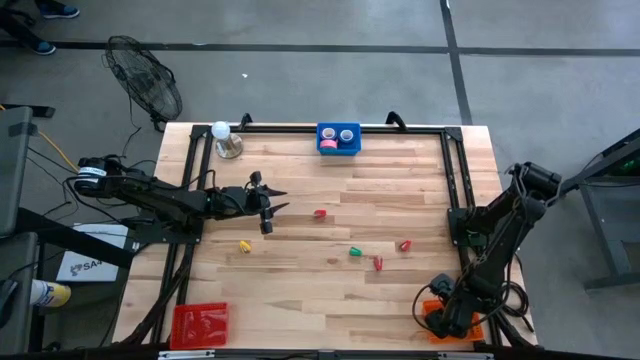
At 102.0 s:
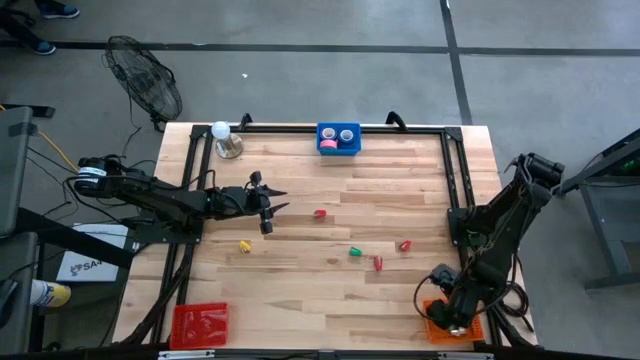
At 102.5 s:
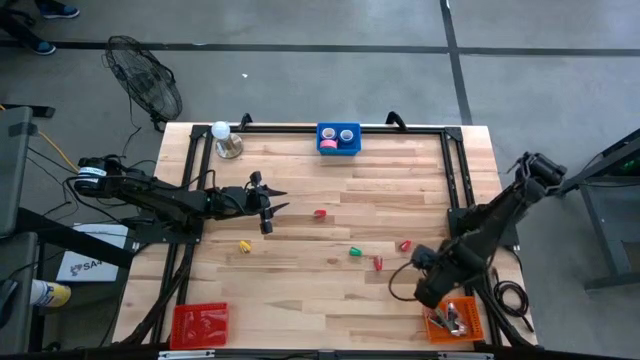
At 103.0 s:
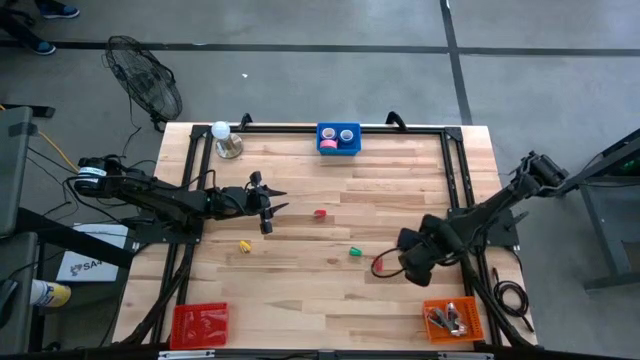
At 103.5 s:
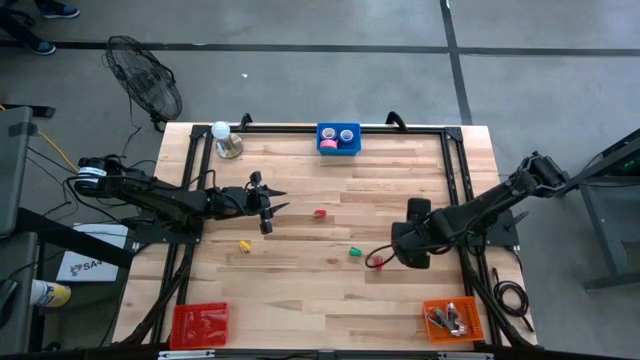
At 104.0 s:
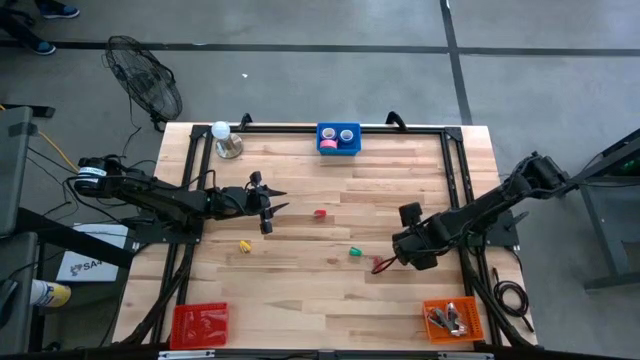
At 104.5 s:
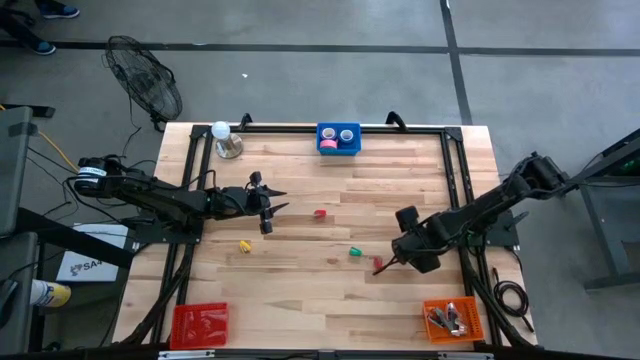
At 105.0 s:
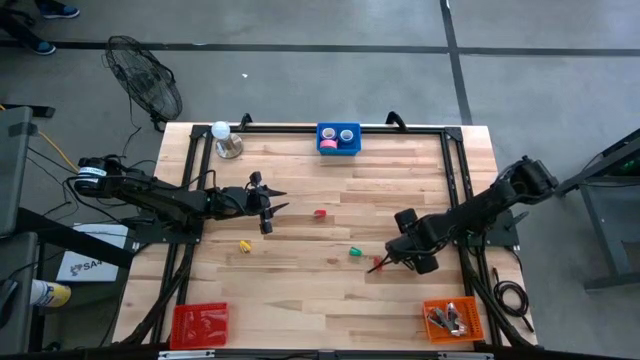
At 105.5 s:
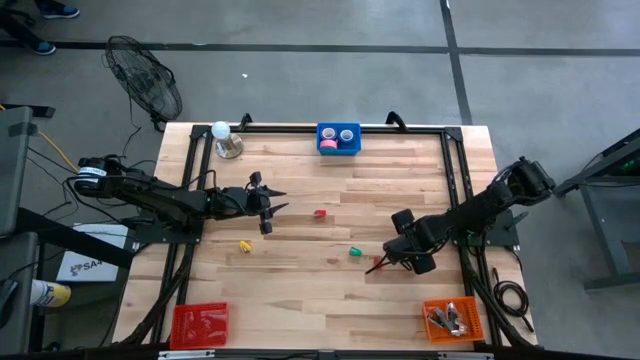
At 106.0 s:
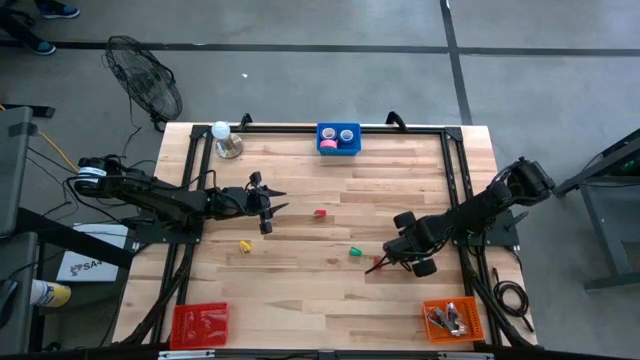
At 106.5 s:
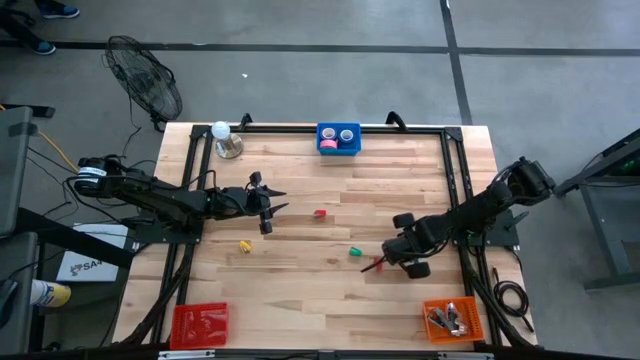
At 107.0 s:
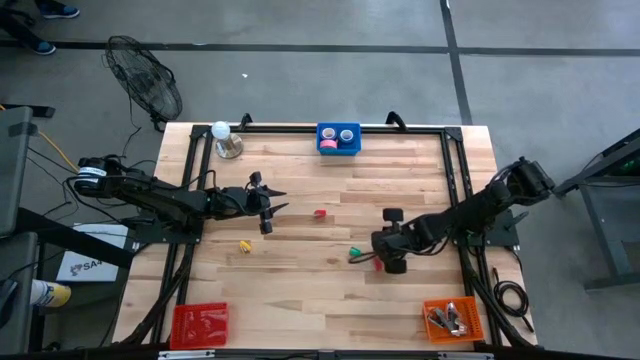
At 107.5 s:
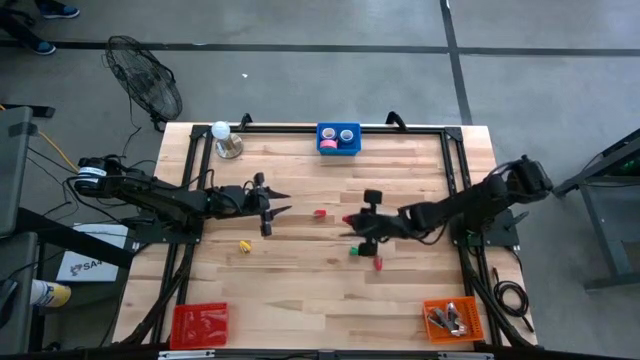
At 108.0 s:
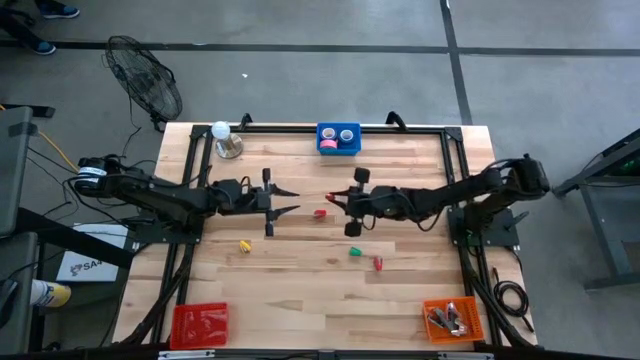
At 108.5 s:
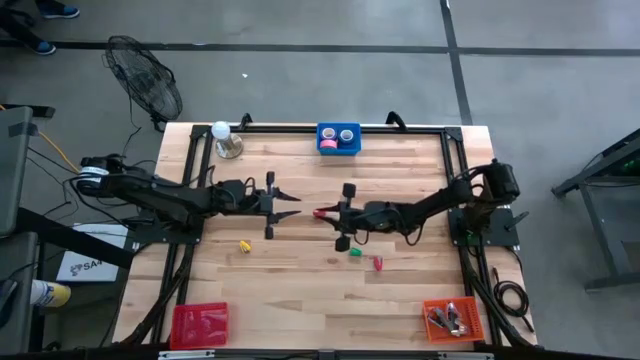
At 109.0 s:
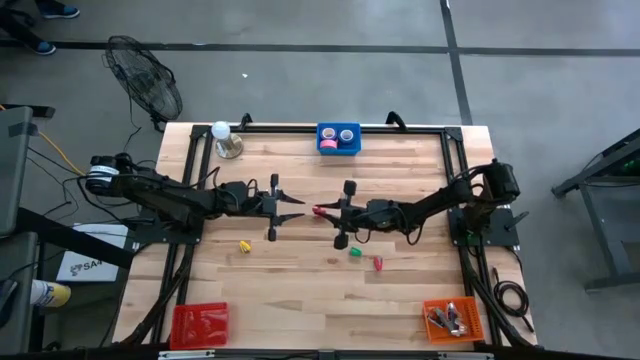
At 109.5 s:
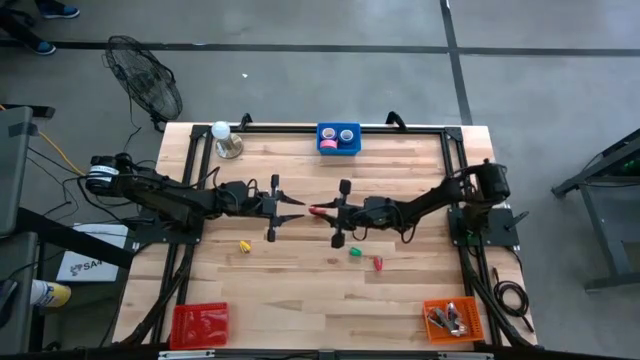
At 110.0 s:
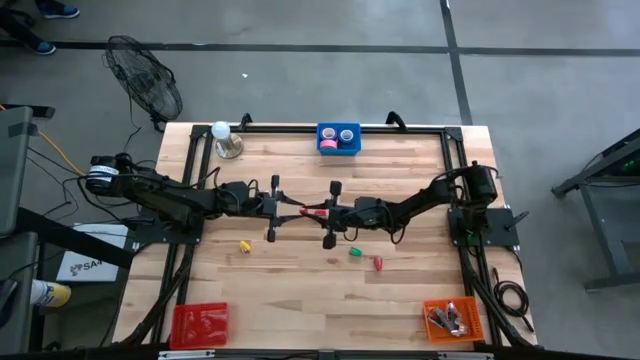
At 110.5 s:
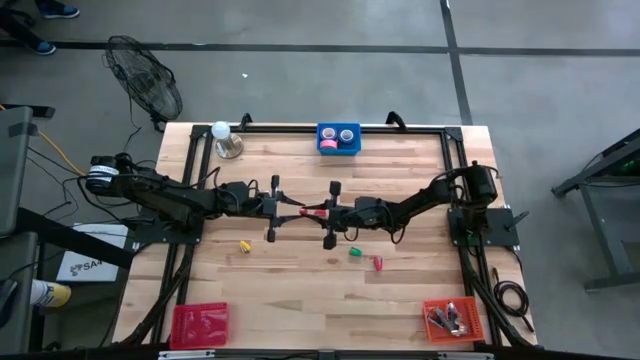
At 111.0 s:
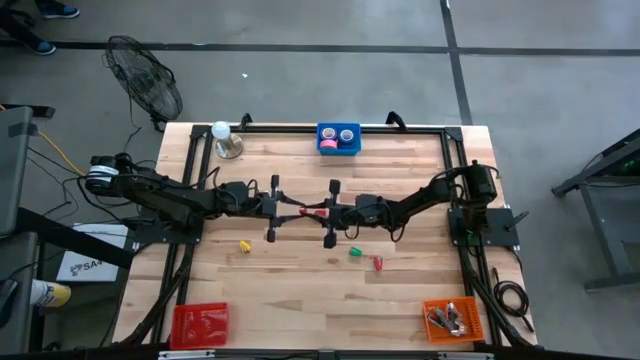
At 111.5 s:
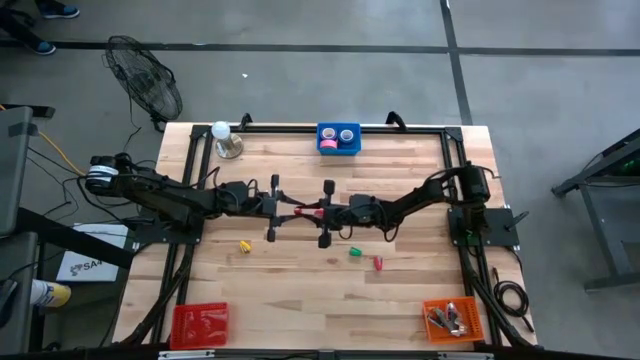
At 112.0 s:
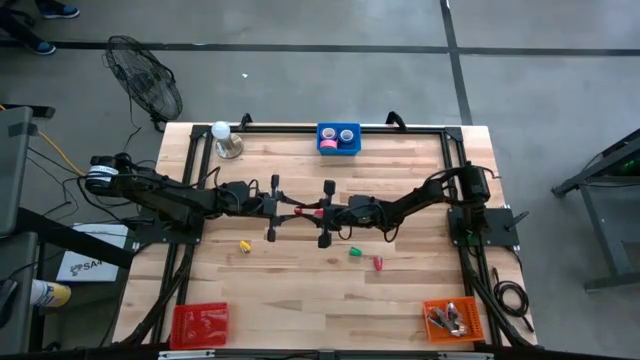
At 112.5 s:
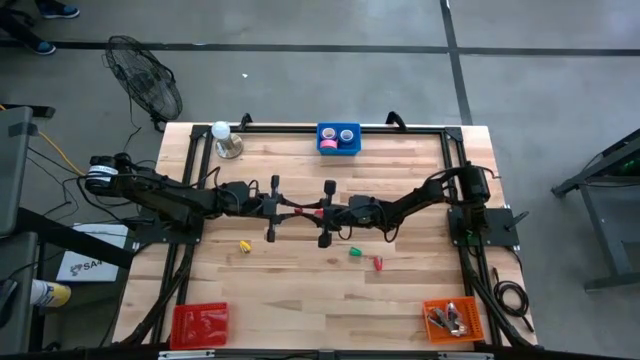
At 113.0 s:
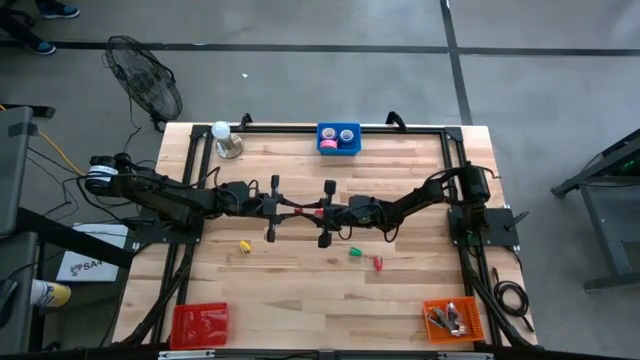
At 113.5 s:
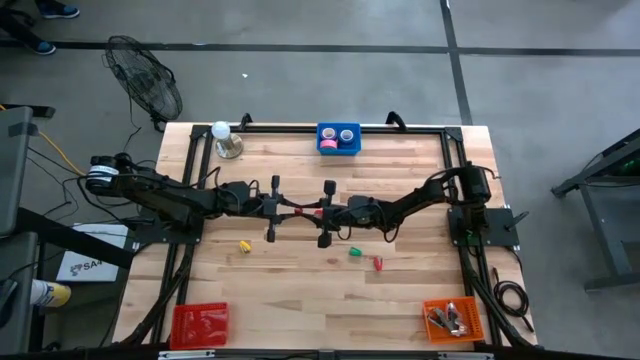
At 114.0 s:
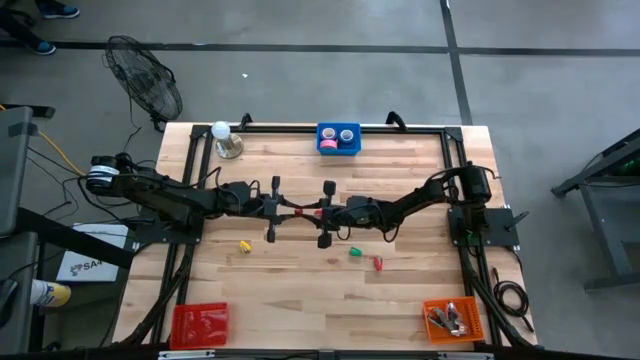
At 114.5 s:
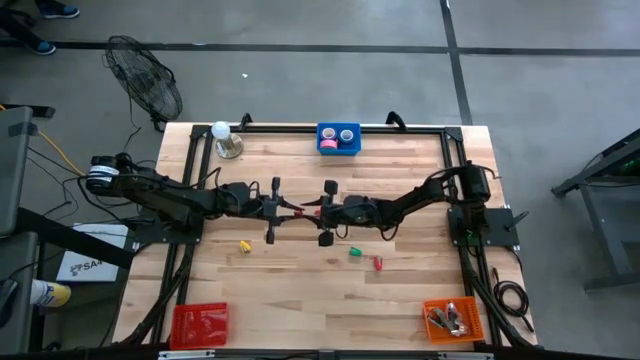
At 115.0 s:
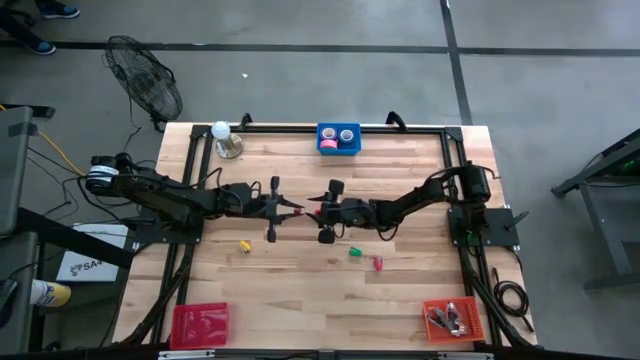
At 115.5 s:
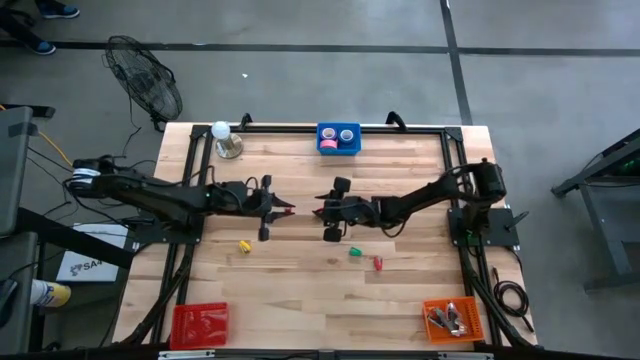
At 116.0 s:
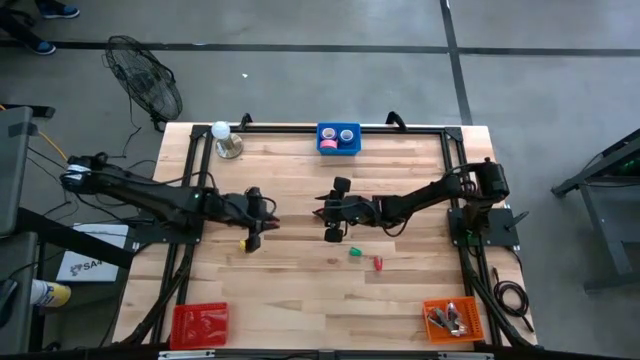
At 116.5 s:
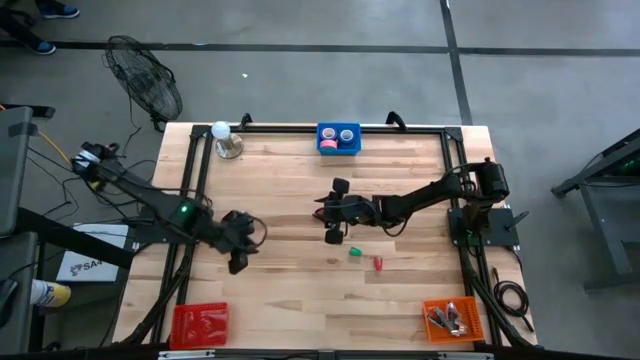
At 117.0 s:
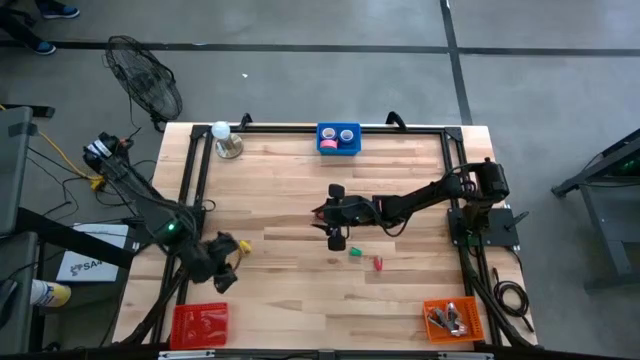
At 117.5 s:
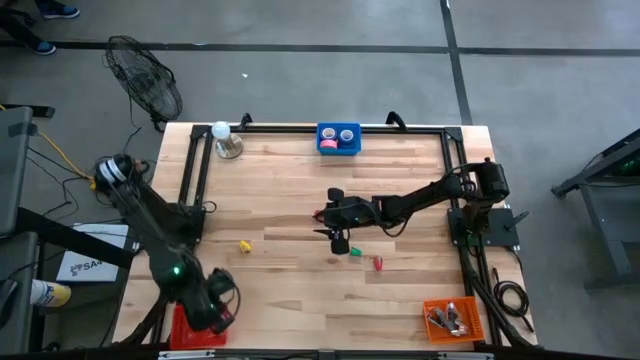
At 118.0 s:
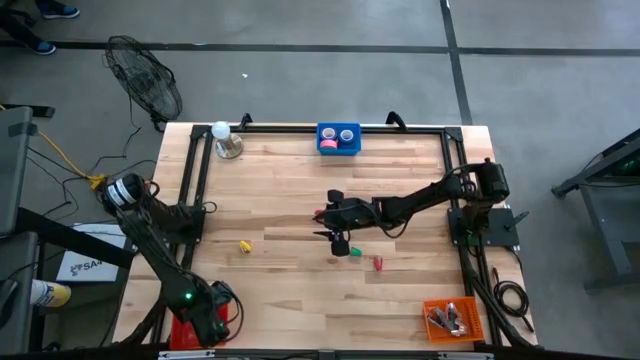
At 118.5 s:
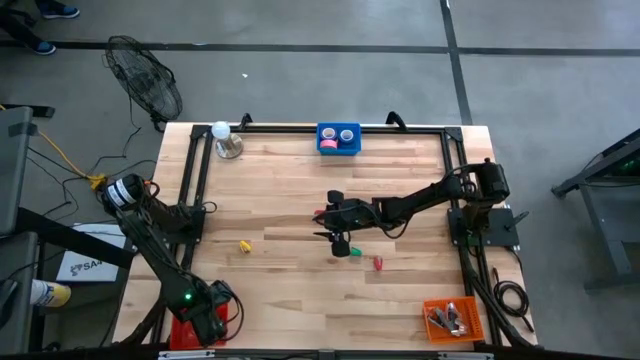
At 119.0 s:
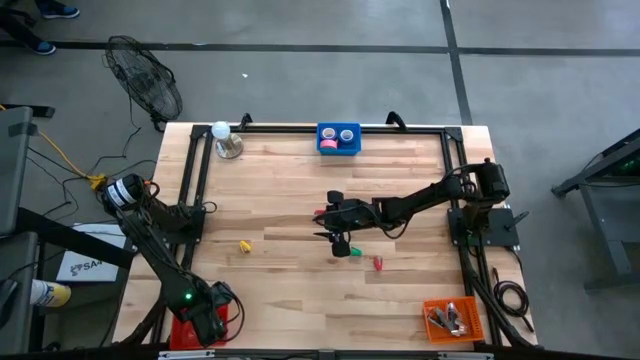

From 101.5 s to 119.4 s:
Task: Pick and place Stapler, Stapler remover, tape
Put the bottom right red stapler into the red bin

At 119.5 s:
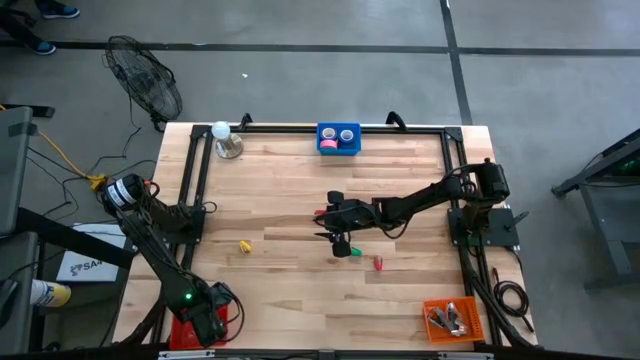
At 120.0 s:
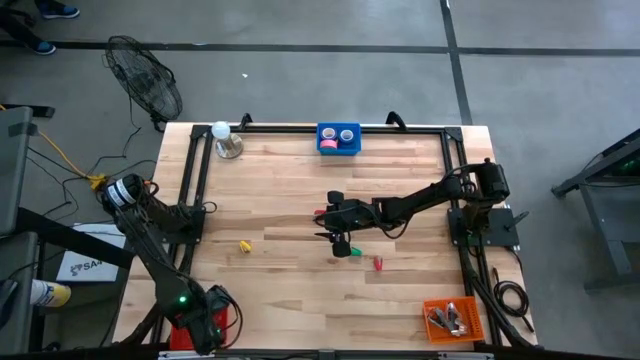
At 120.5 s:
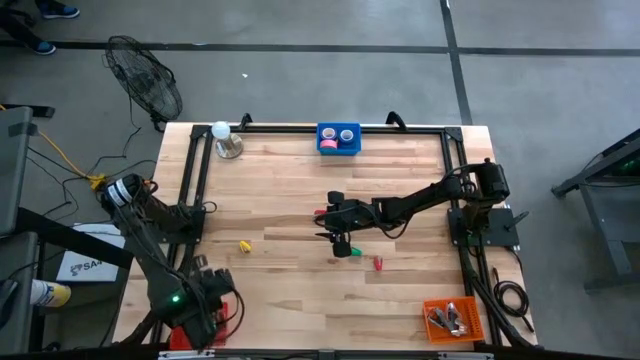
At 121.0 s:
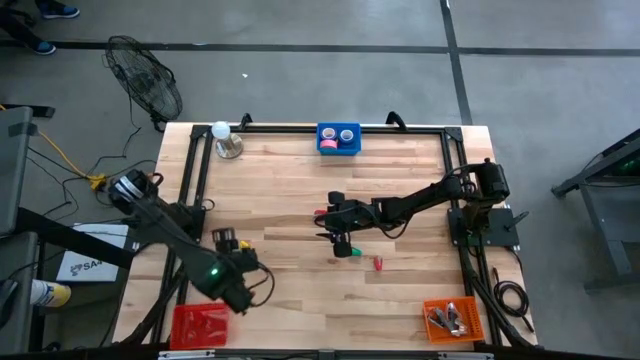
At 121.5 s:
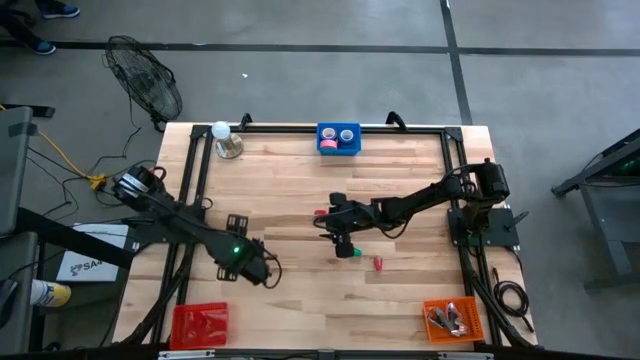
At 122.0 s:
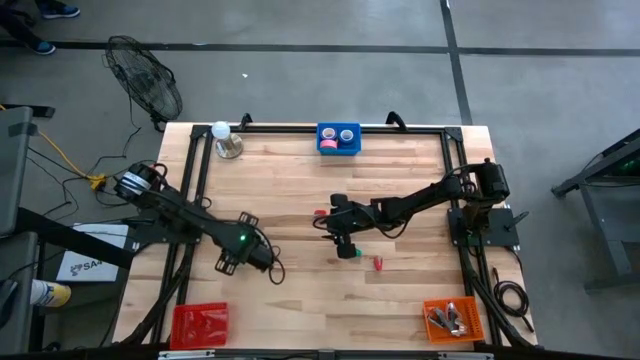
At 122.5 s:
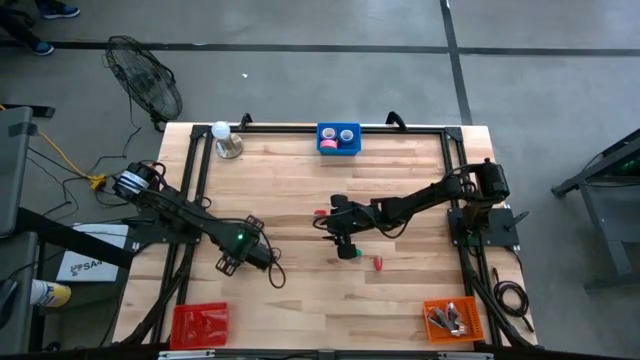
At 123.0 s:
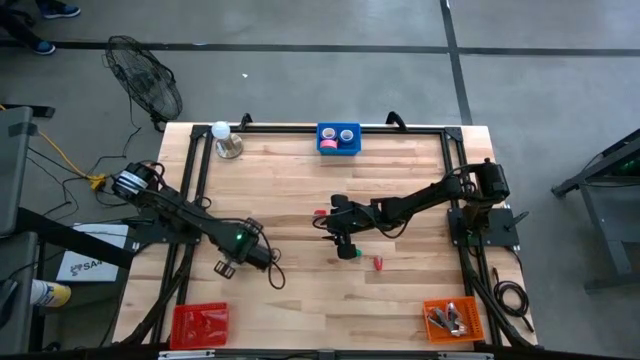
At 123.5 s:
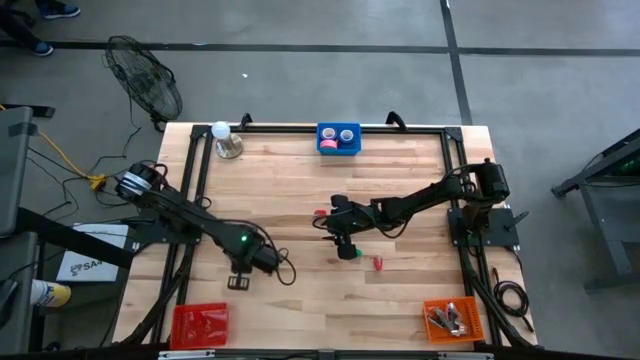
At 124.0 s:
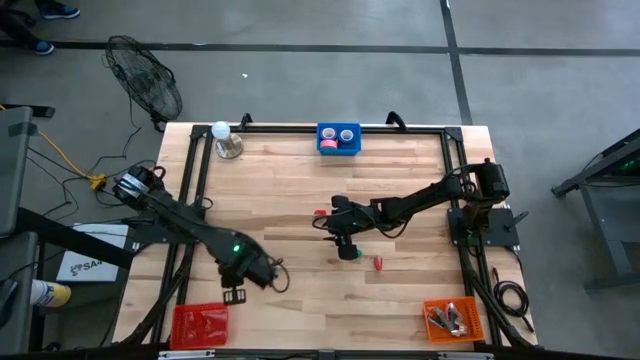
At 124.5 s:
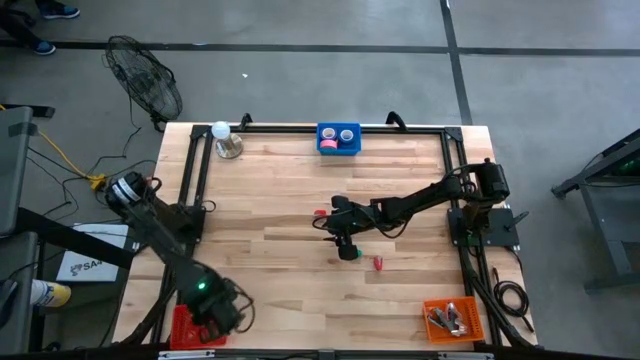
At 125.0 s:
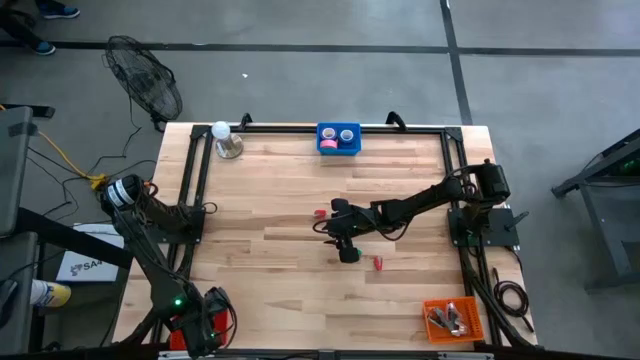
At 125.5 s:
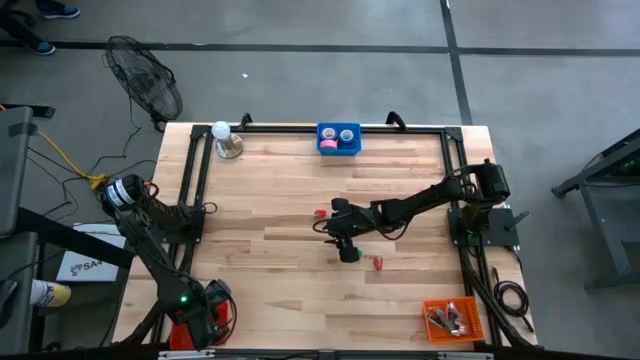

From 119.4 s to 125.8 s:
Put the yellow stapler into the red bin
